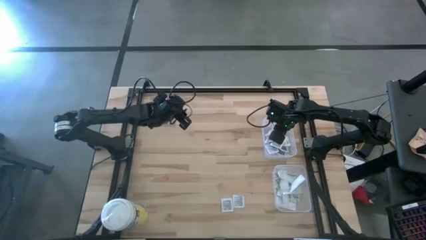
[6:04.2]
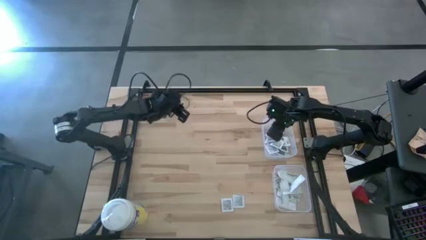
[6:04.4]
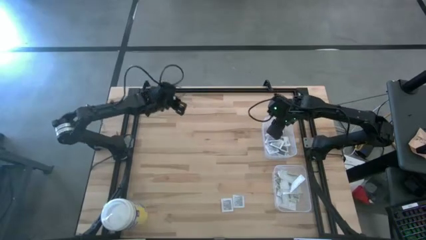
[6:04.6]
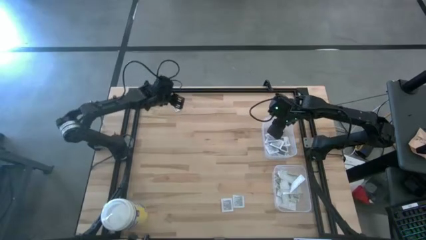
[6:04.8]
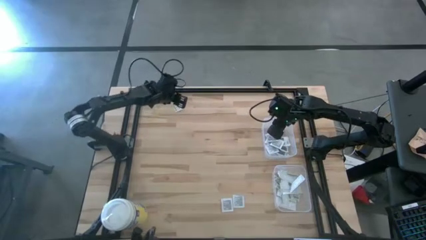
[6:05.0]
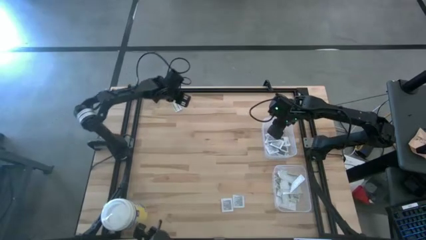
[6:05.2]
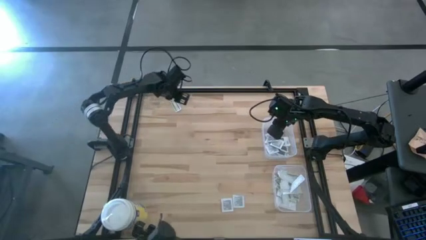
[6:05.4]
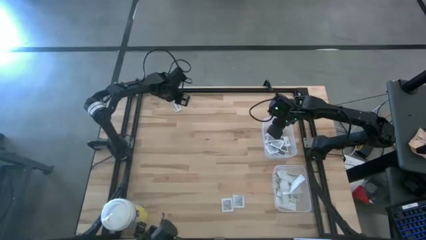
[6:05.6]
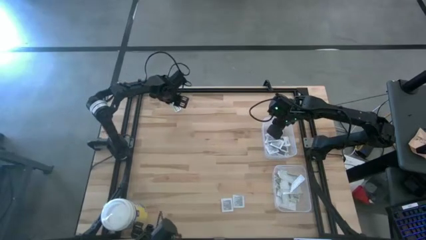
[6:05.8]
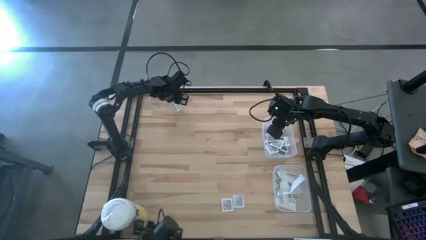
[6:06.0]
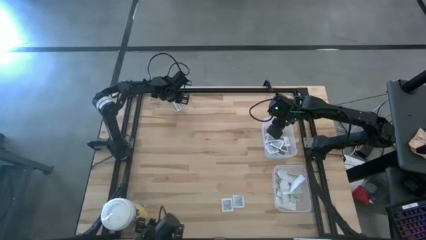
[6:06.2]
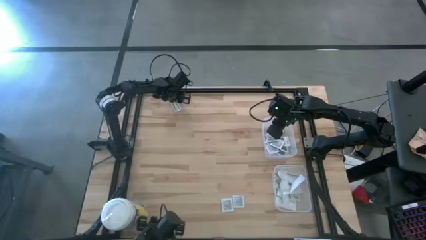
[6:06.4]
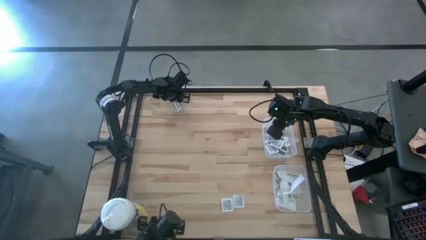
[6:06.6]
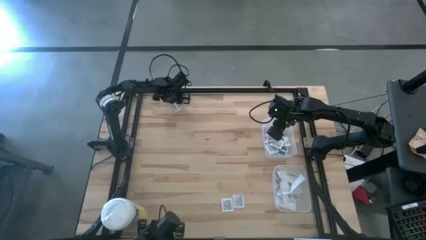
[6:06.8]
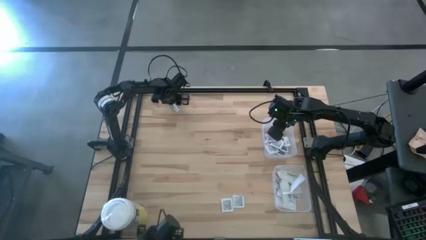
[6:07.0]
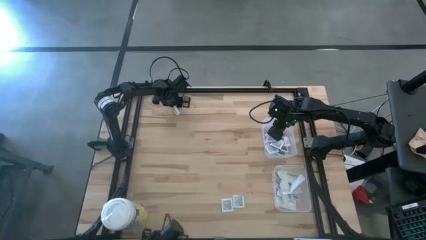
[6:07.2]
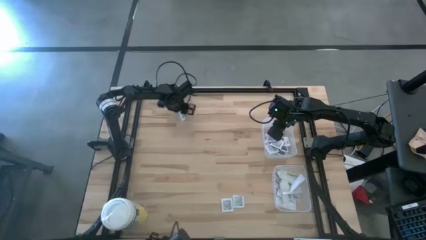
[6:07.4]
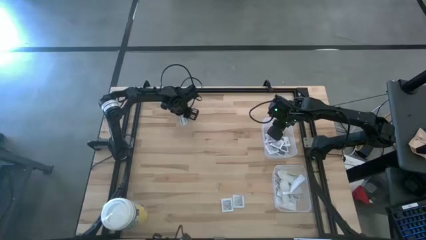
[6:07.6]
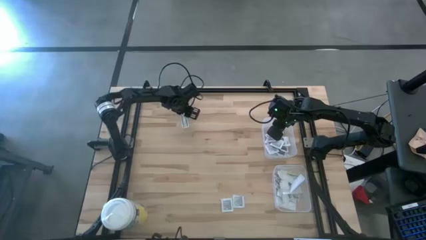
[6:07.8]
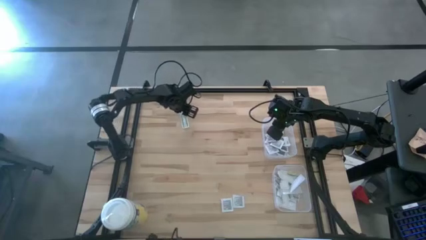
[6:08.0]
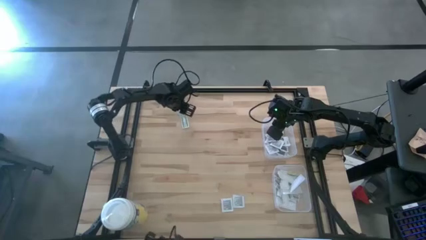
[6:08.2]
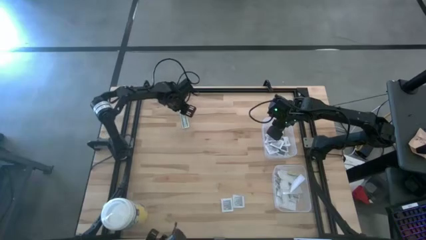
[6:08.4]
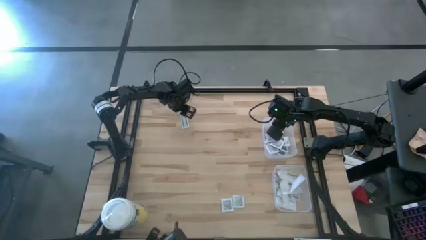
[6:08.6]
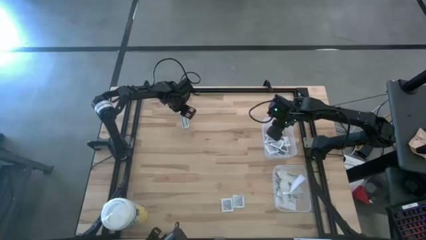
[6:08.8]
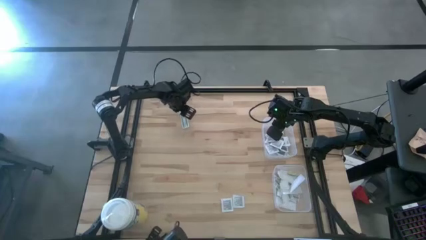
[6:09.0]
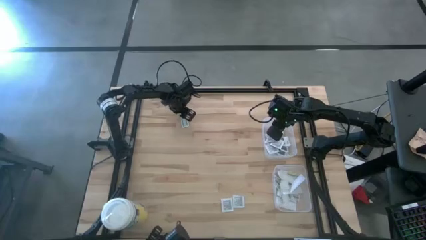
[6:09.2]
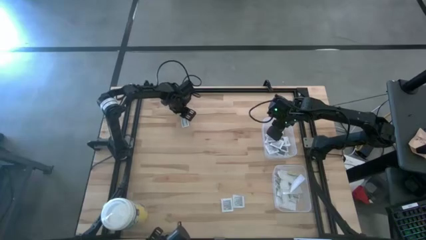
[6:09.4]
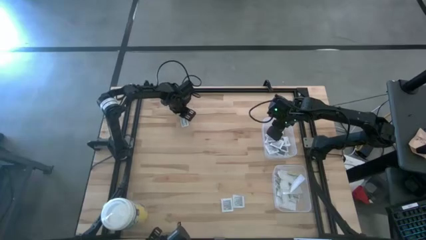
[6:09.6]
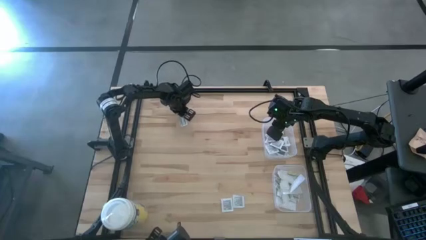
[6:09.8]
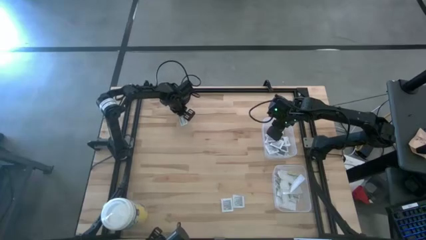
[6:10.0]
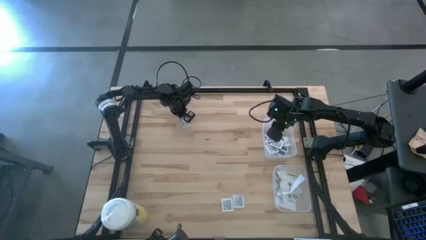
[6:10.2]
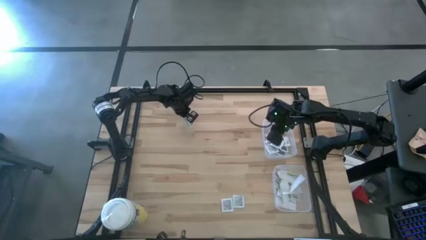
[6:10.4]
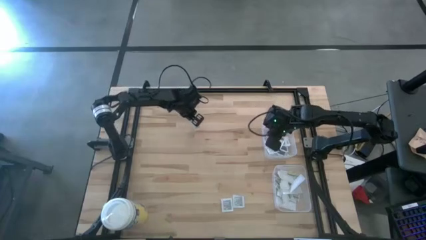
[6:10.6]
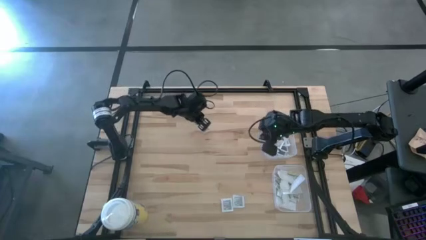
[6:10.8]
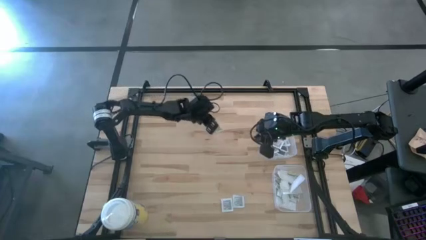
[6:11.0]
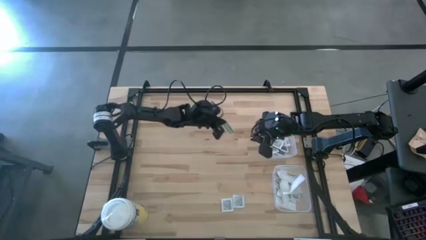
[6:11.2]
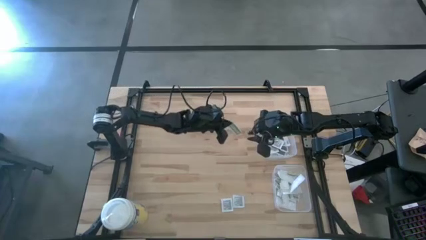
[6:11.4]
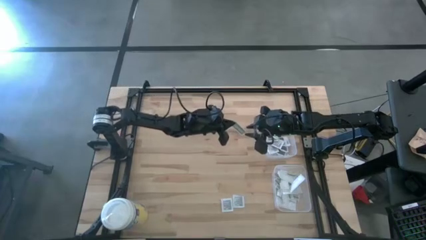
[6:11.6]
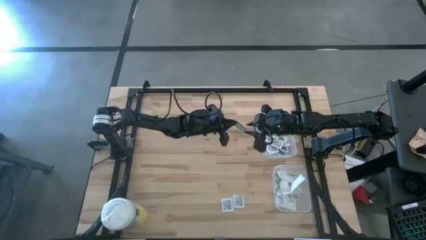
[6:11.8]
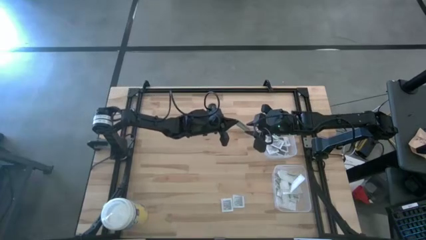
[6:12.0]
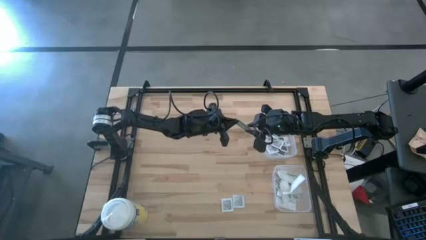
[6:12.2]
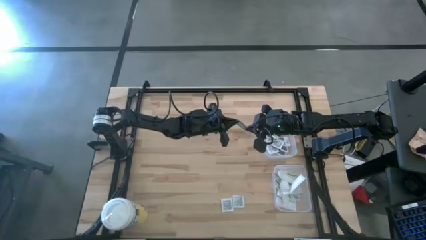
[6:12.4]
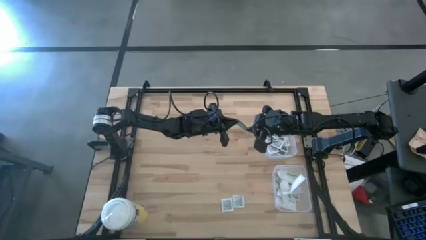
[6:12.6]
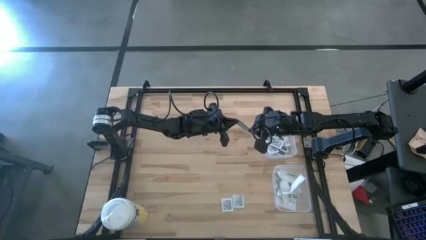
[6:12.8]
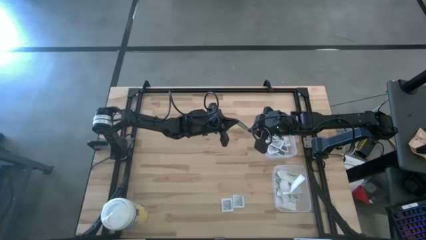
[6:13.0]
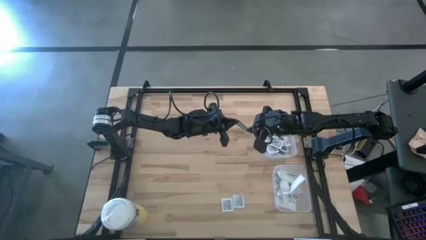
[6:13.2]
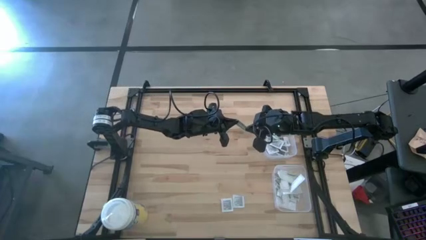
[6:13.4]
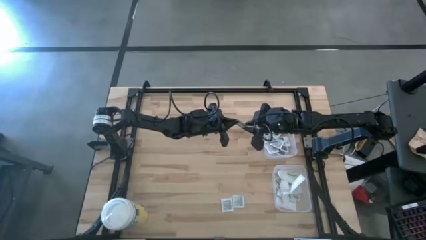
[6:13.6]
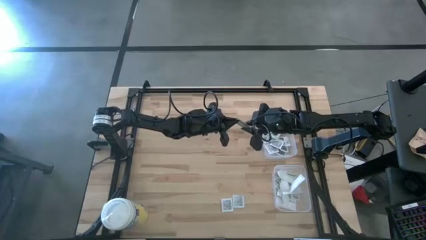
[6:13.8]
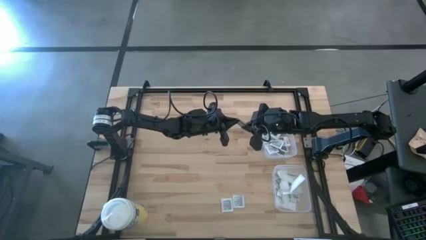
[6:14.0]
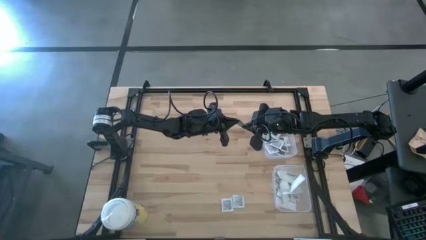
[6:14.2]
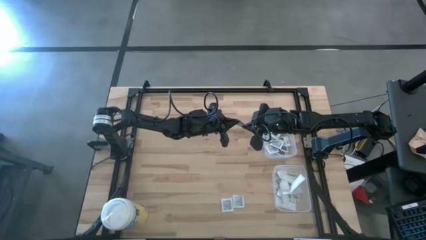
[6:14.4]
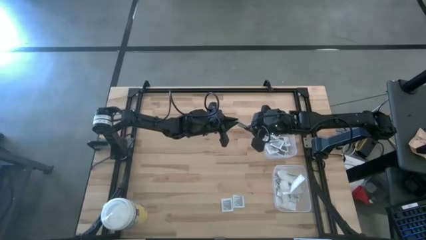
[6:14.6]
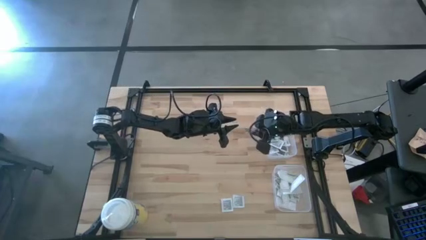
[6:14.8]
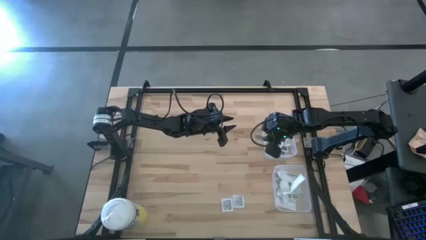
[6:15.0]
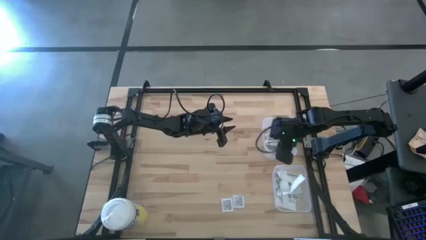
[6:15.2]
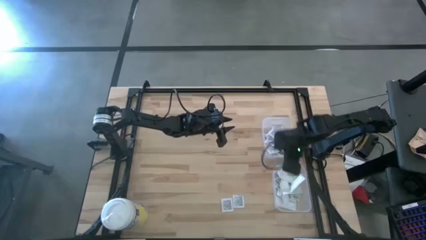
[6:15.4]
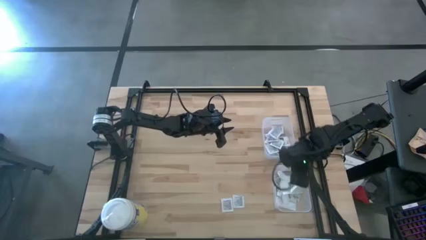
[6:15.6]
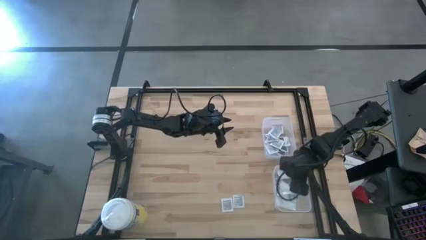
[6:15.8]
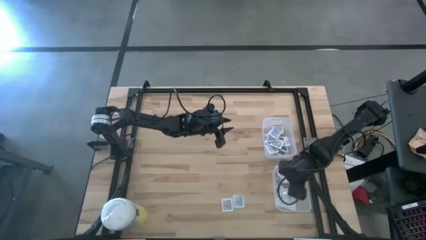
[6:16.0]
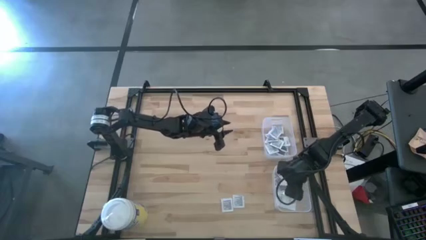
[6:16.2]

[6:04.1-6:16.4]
Task: Pick & Place First Aid Supplies
Put the bandage pack into the bottom bin

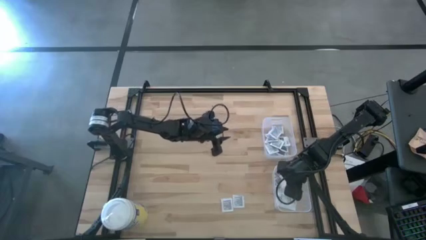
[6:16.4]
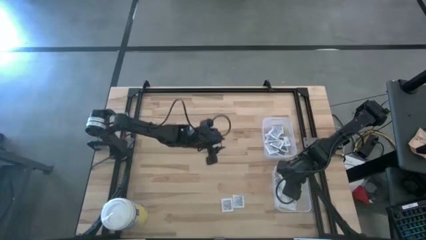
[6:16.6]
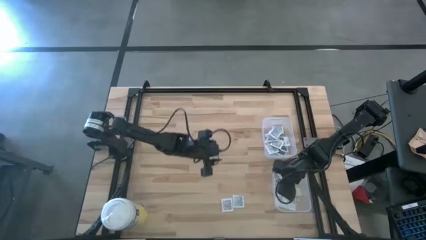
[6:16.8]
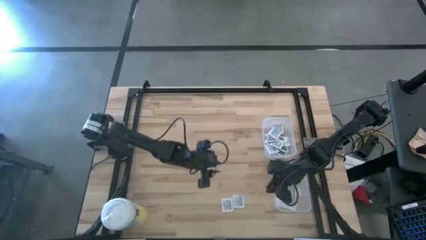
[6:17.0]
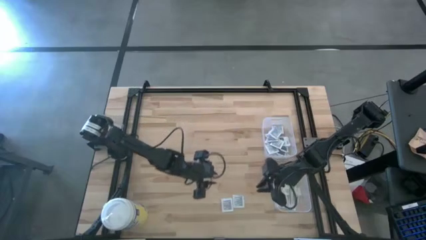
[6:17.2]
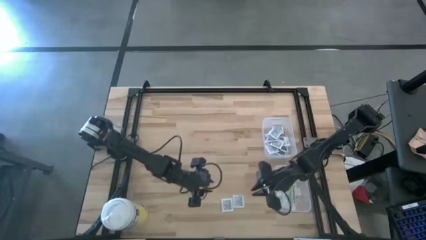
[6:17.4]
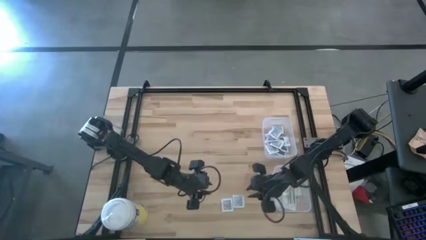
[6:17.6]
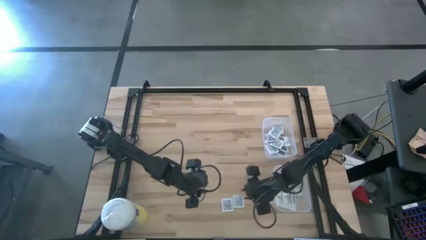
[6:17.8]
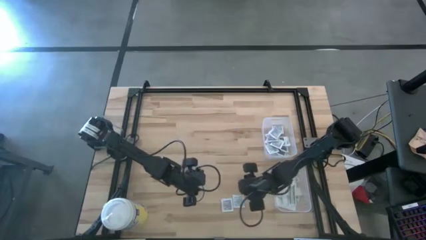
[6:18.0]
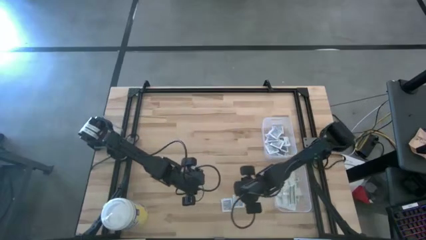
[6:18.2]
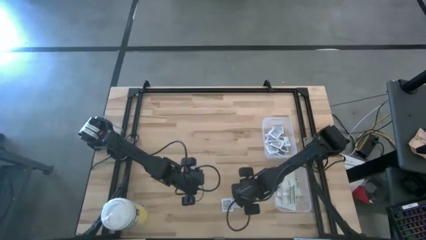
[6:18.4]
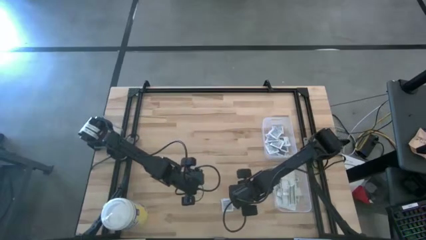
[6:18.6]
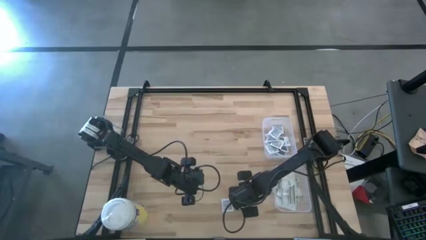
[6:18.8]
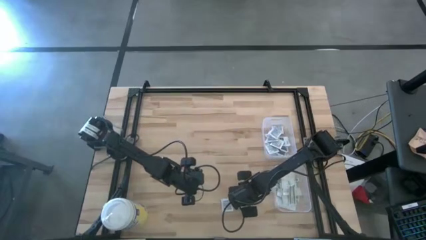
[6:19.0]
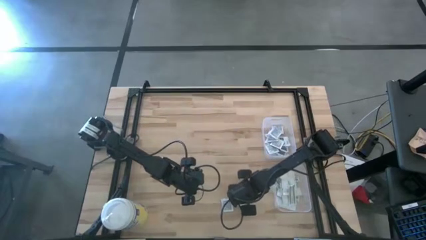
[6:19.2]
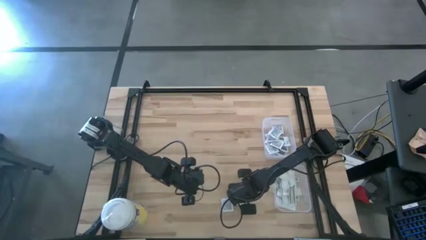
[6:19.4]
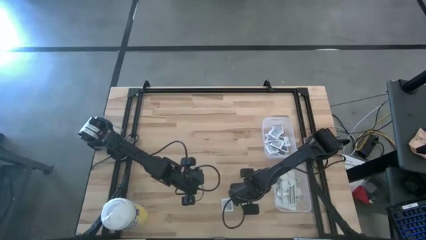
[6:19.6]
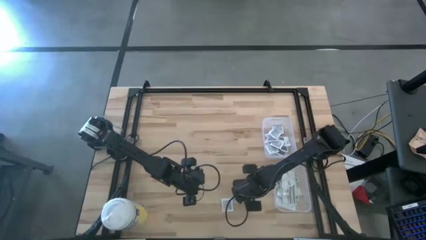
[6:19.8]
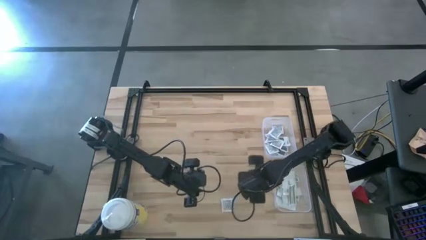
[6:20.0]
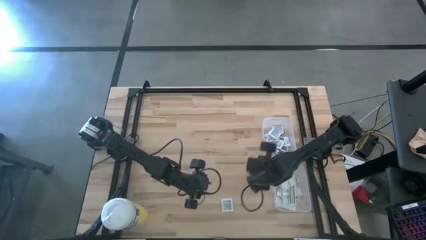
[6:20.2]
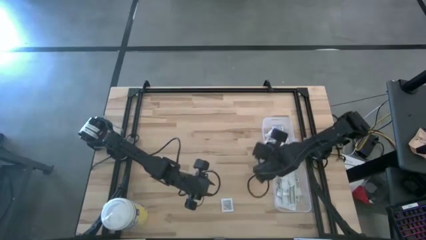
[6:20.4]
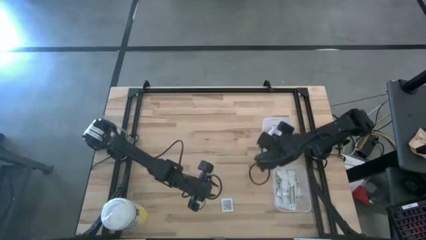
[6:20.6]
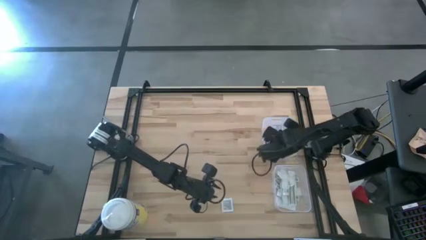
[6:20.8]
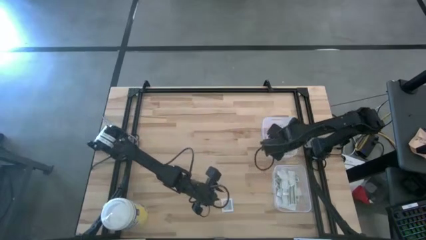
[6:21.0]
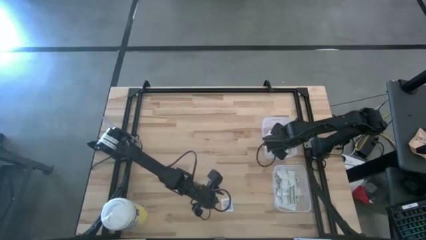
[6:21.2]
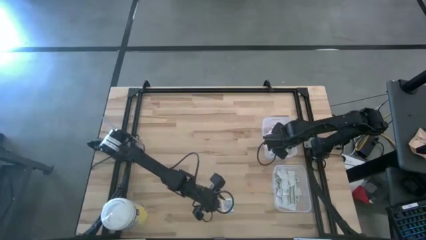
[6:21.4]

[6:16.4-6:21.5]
Put the right towelette pack into the top bin
